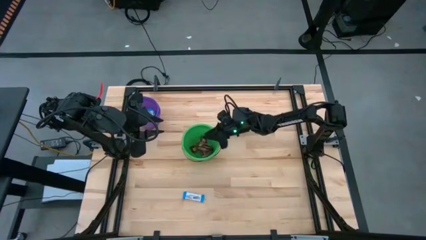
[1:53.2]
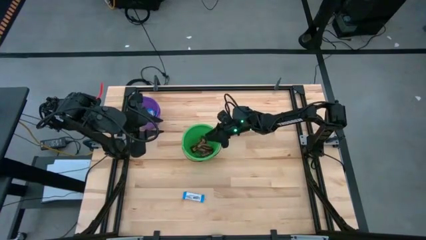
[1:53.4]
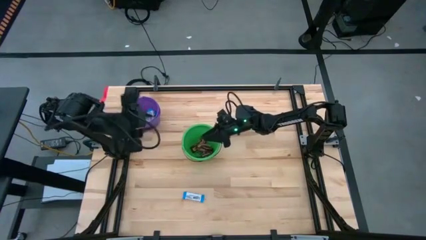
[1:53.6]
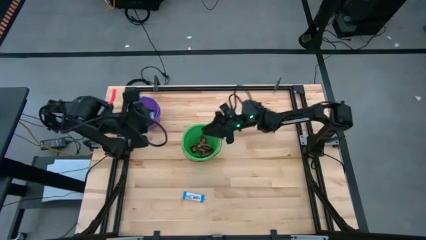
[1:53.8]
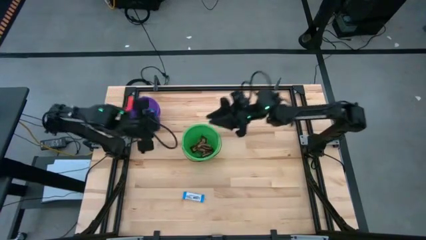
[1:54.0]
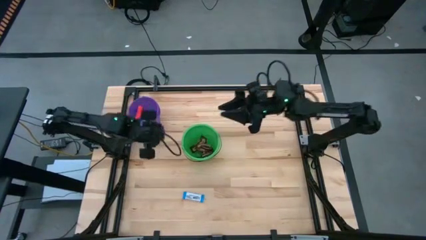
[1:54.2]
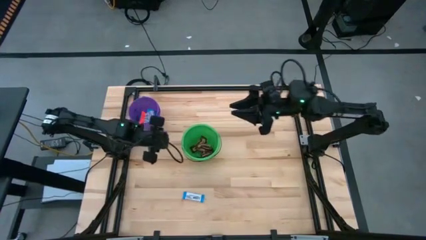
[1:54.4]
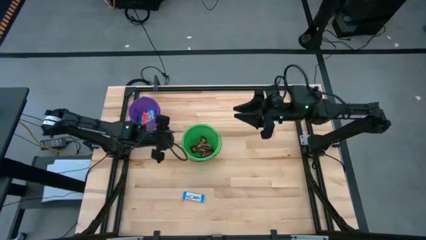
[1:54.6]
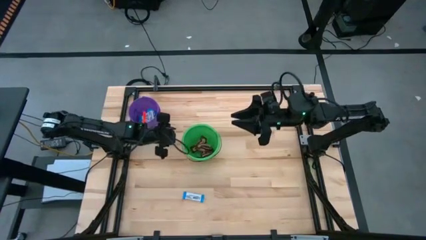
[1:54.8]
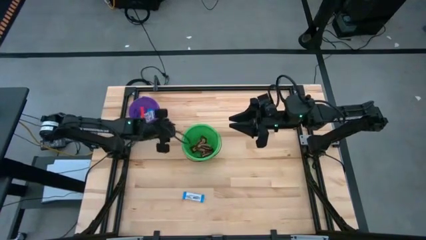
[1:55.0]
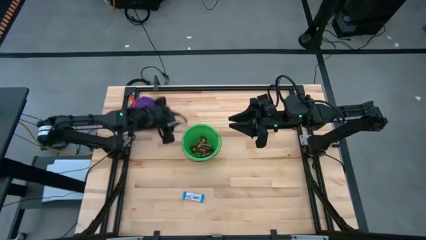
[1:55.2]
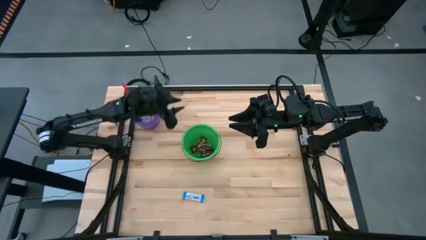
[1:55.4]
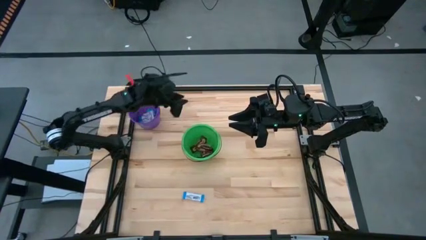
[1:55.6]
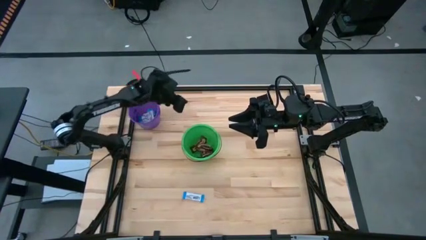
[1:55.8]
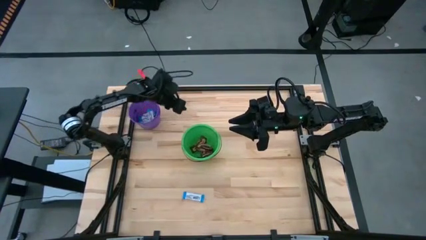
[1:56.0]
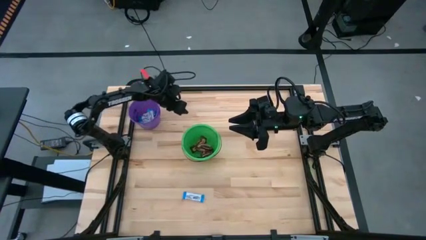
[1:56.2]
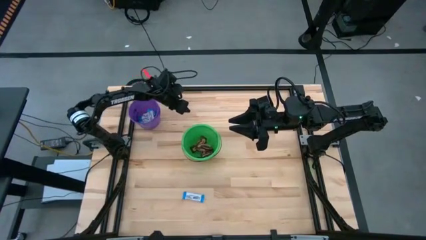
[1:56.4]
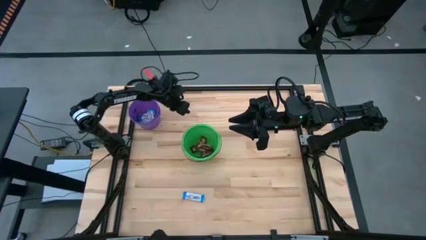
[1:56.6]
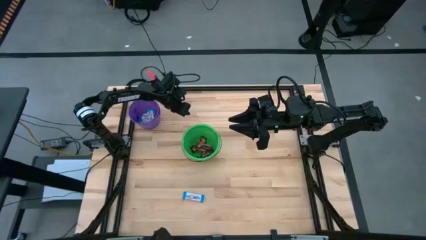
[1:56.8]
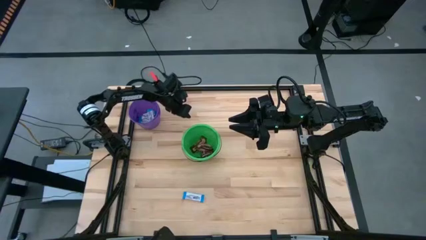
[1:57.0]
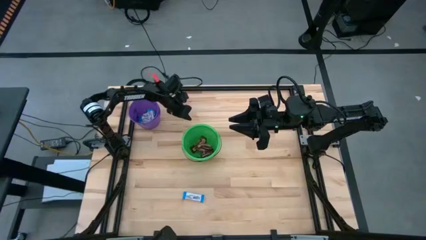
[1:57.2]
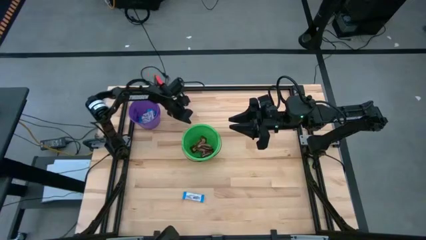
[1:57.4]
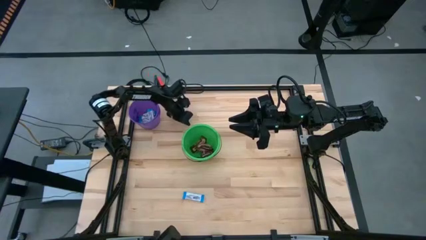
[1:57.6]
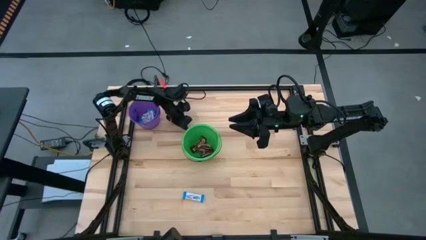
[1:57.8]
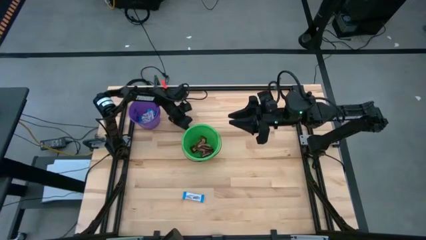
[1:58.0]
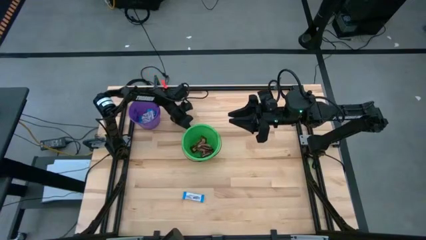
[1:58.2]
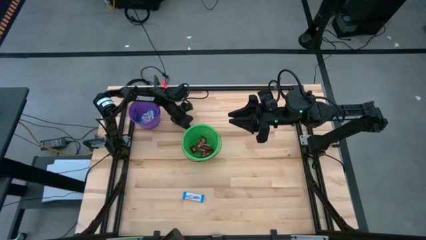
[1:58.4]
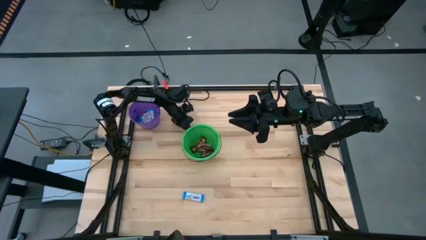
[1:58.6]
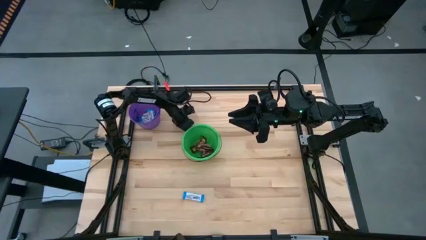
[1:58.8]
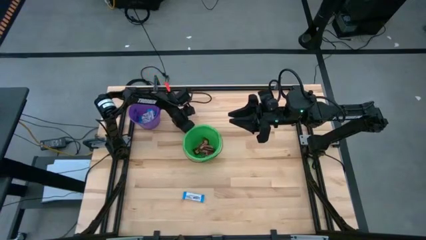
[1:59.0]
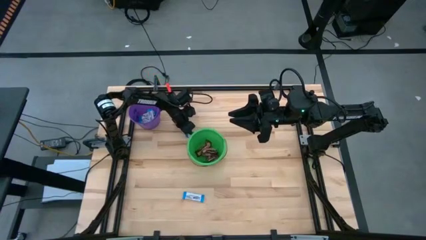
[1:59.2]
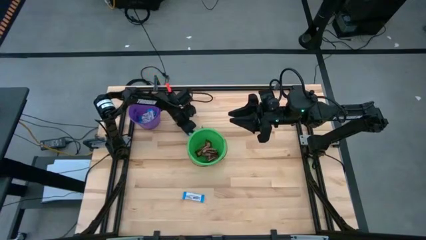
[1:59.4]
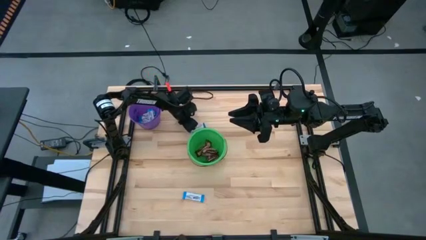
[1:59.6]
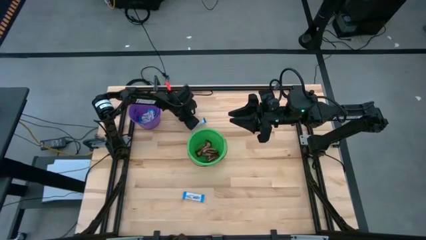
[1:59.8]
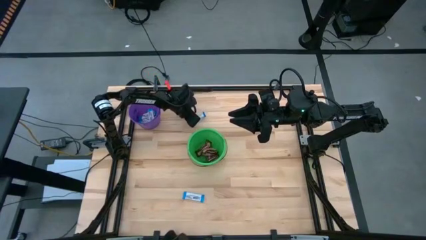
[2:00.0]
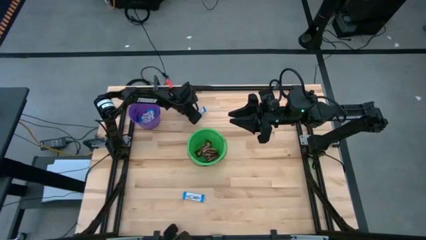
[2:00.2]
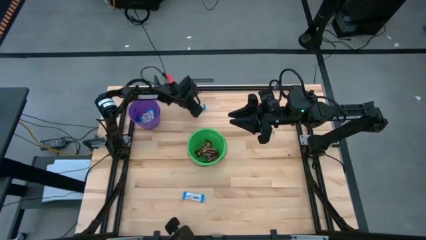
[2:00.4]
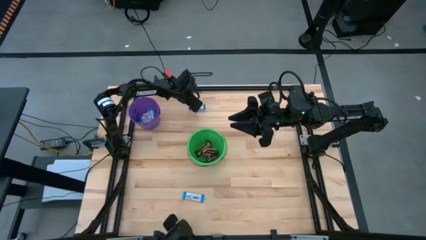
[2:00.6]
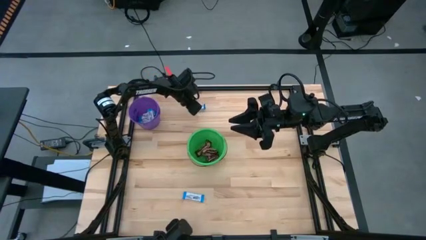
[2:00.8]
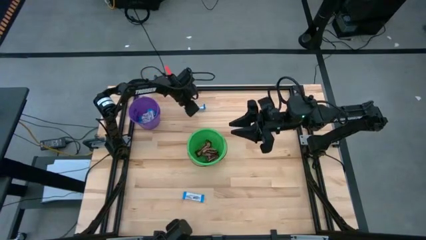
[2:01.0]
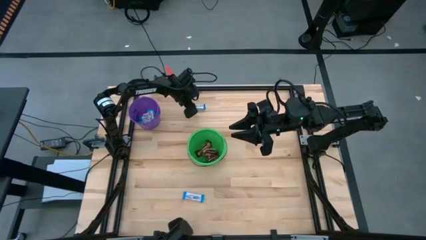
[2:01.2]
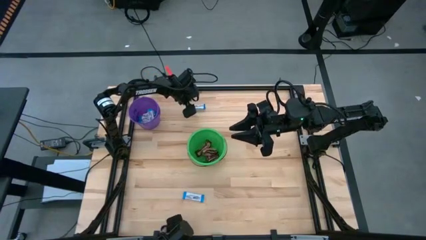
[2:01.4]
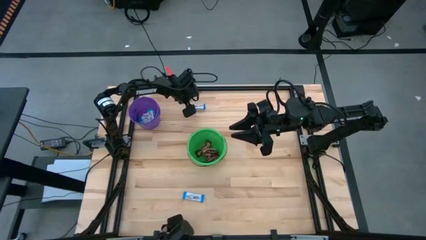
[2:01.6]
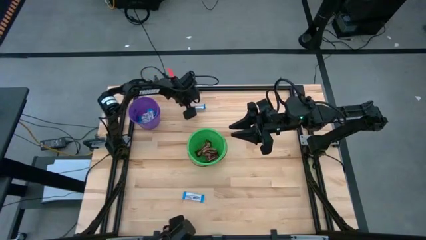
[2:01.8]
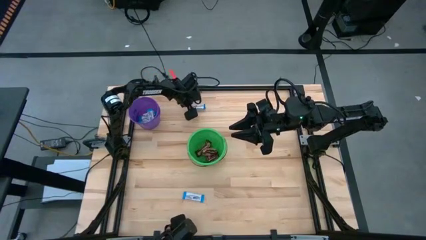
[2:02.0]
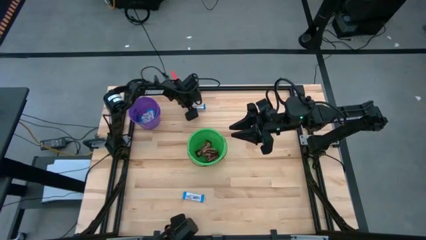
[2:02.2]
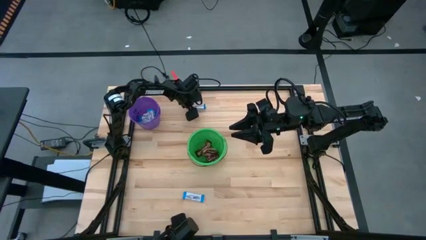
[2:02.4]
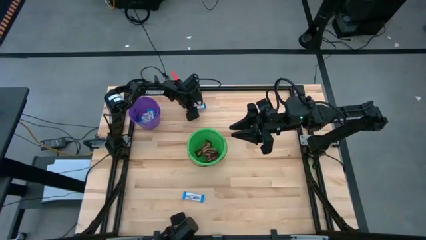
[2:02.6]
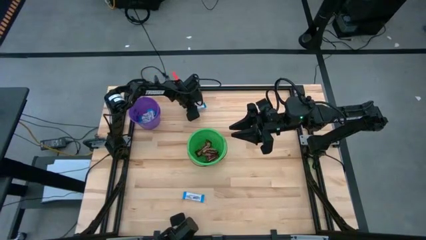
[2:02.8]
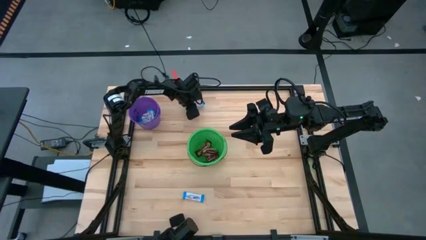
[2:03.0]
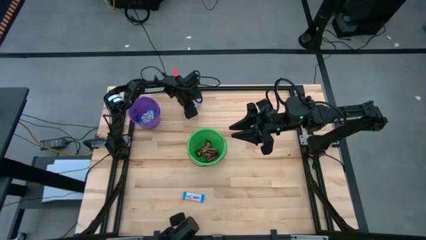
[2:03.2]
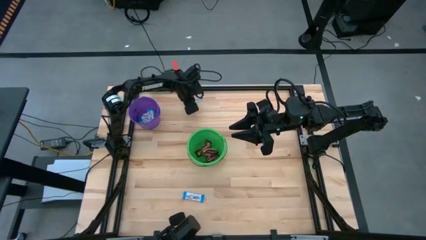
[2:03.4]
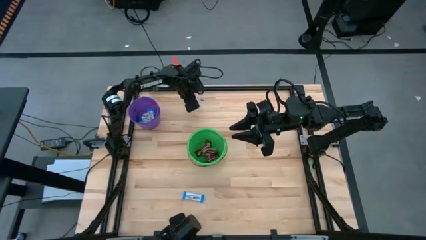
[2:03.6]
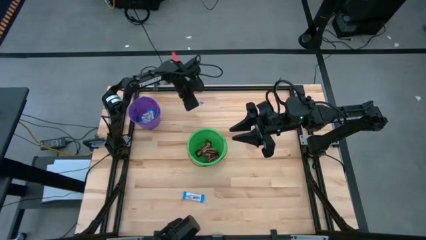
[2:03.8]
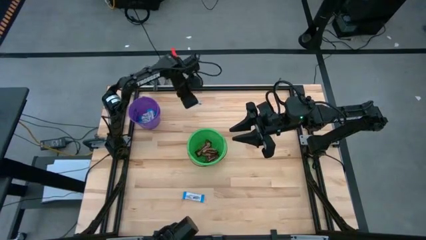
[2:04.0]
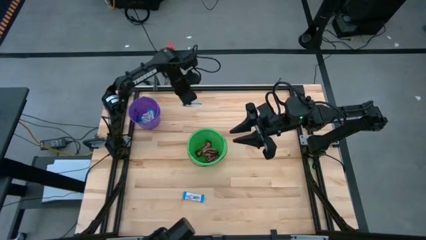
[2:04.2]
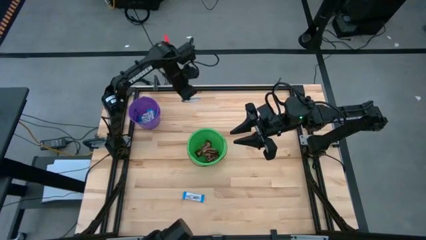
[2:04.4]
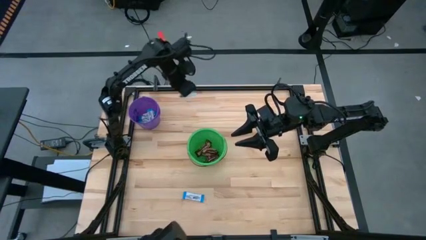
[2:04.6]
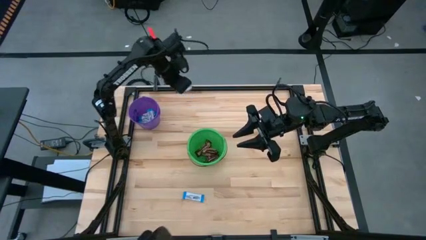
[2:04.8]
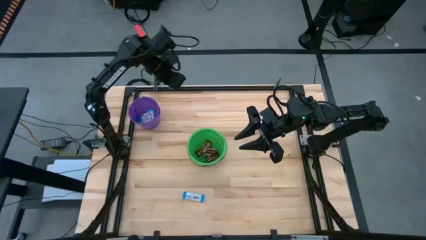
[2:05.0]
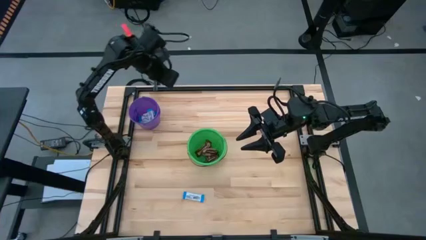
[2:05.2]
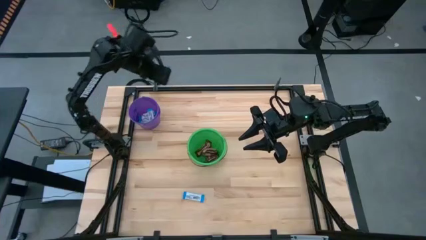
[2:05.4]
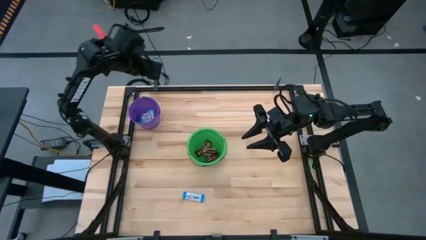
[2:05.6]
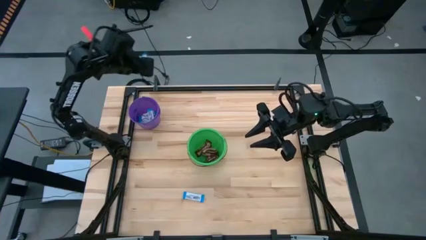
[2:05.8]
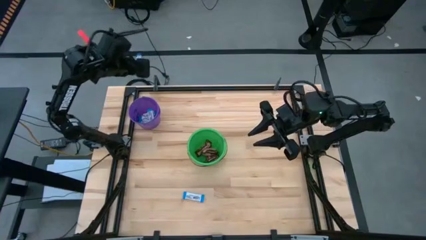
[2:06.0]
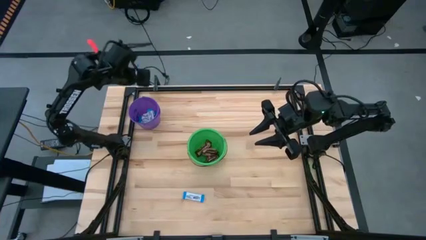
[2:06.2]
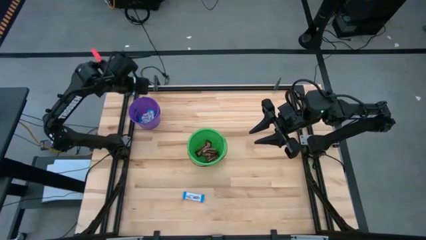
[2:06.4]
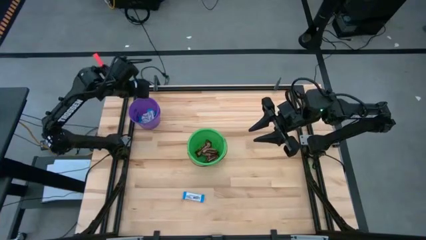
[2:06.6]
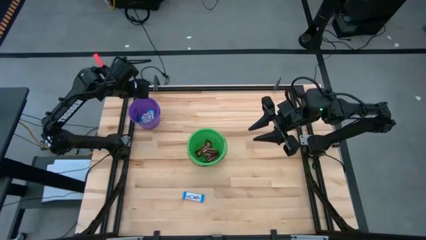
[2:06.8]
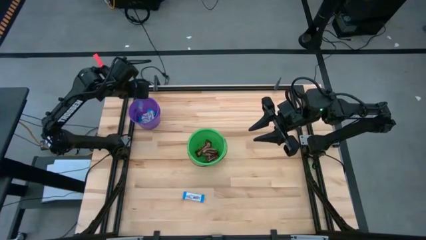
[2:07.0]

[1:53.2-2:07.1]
Task: Sort candy by brand, put in halloween buckets
Put the white chocolate bar into the violet bucket

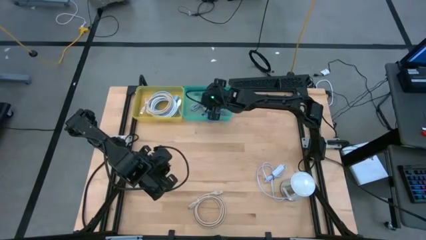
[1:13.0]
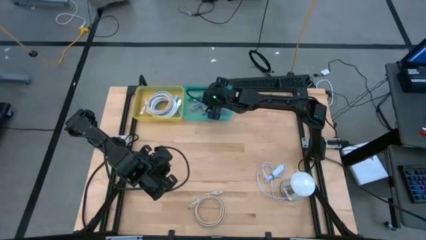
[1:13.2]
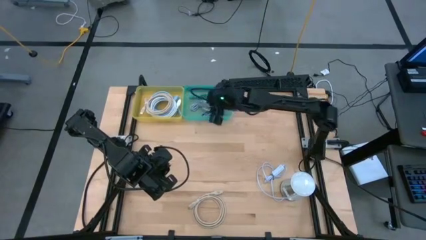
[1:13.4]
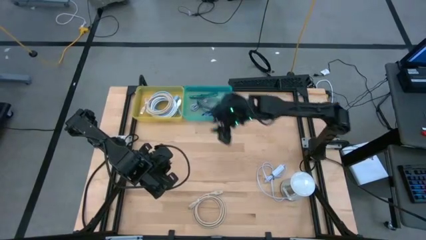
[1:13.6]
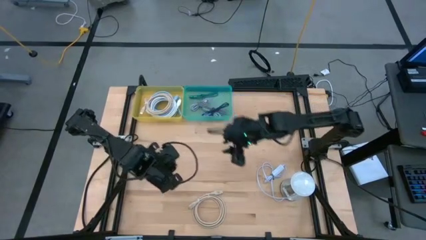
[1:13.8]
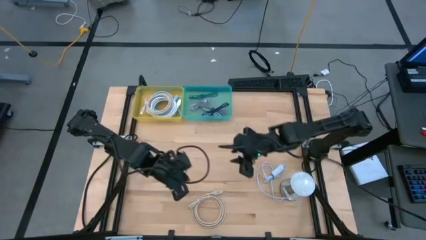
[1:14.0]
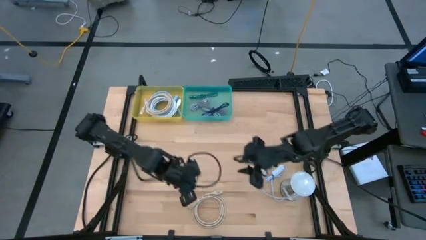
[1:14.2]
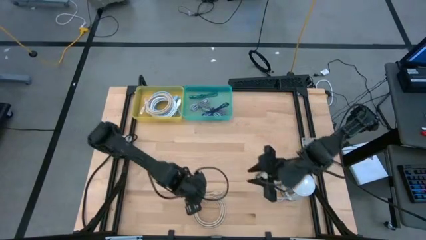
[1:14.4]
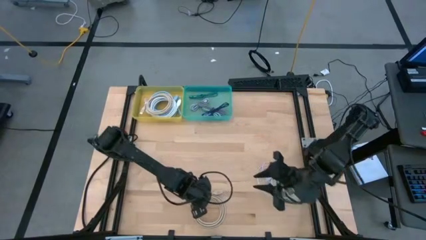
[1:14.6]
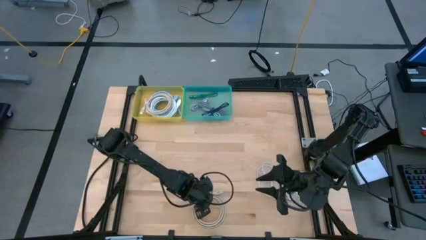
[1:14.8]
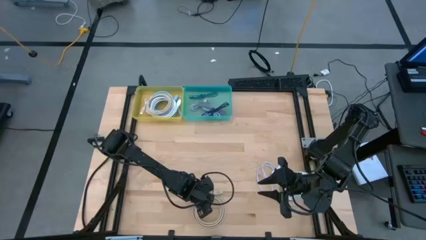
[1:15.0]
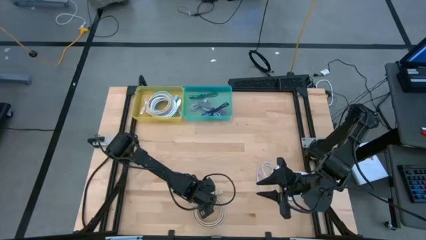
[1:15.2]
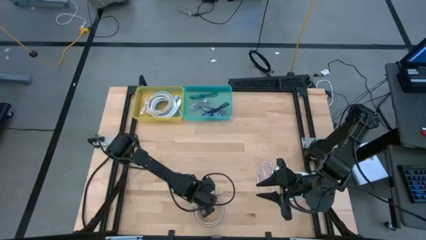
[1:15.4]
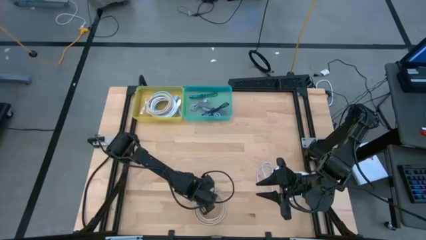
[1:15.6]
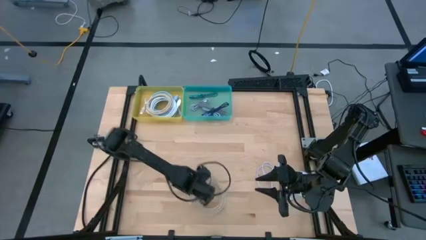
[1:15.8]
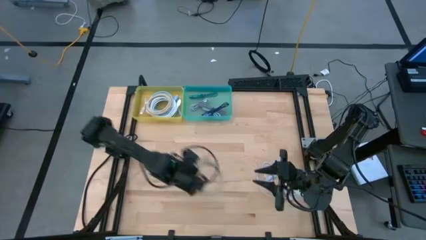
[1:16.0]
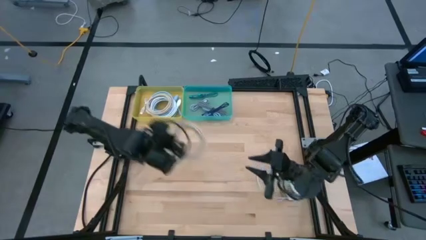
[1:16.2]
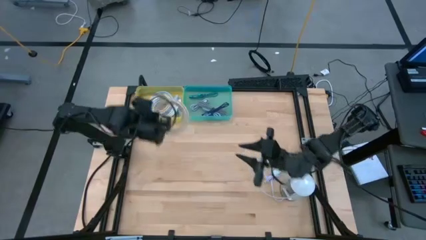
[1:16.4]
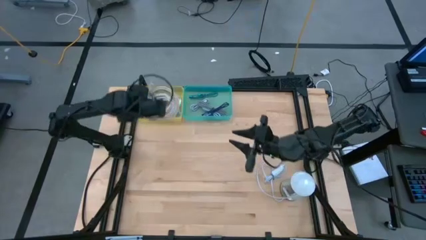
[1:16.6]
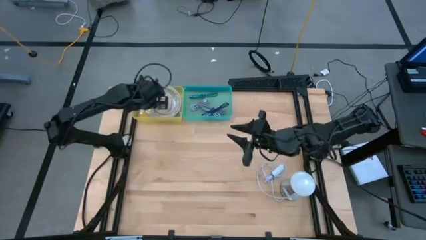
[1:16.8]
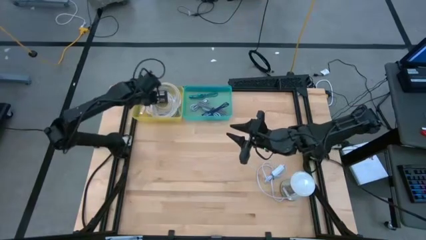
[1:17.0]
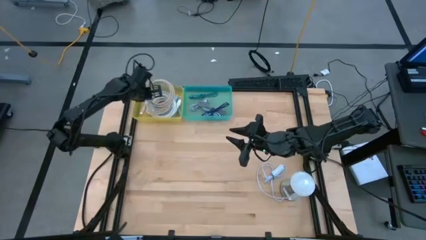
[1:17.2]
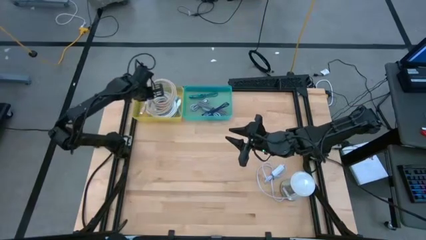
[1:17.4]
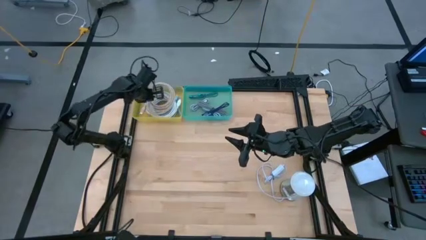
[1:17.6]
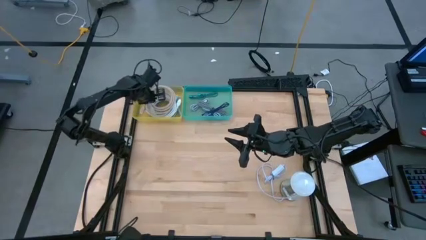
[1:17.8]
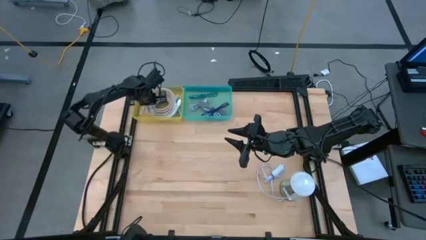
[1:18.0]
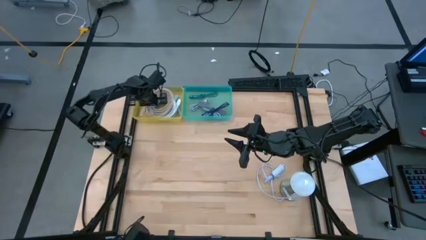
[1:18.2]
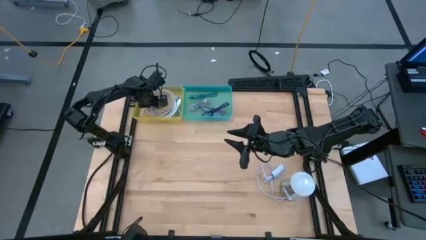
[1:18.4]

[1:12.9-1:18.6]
Task: Pick & Place USB Port
Put the brown HDMI cable into the yellow bin
